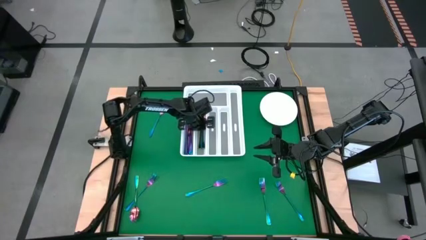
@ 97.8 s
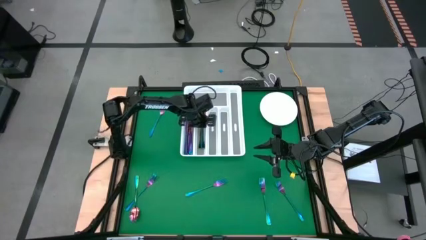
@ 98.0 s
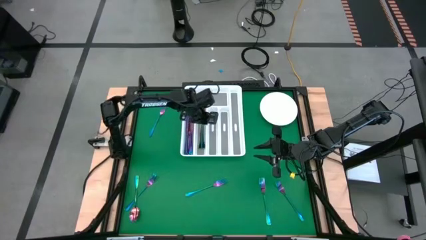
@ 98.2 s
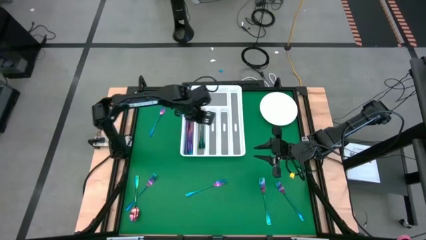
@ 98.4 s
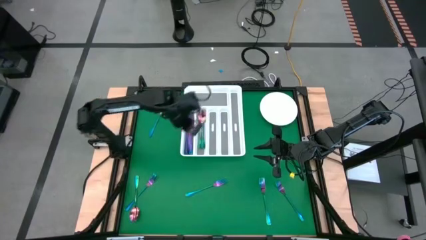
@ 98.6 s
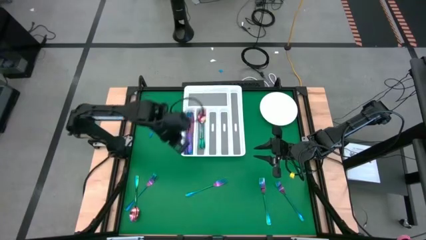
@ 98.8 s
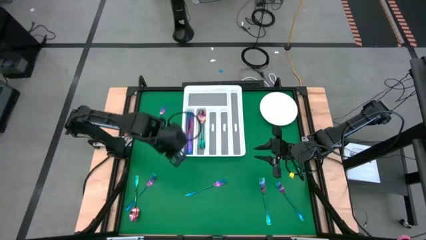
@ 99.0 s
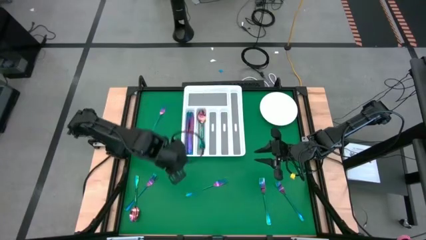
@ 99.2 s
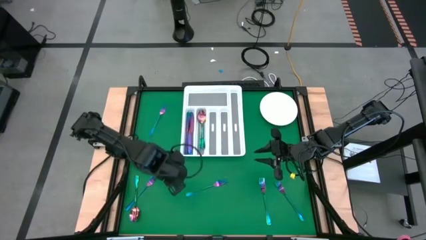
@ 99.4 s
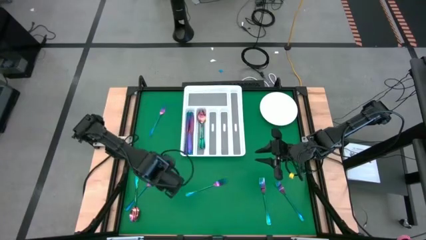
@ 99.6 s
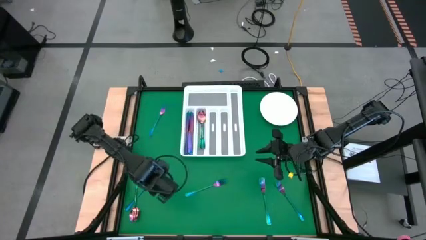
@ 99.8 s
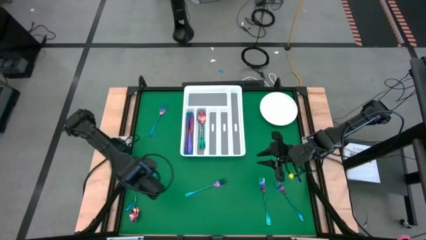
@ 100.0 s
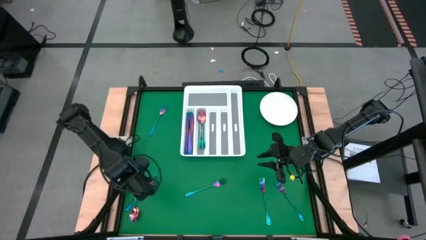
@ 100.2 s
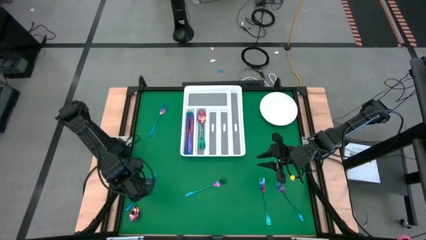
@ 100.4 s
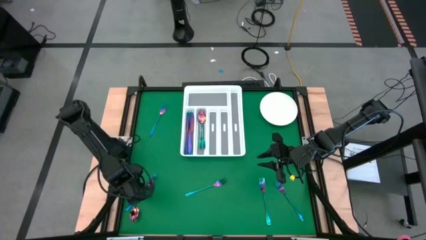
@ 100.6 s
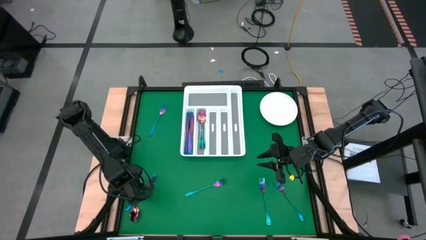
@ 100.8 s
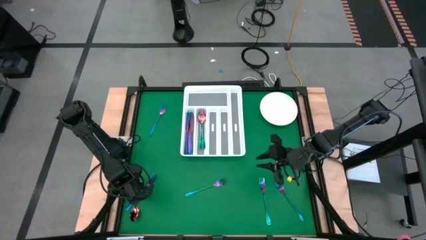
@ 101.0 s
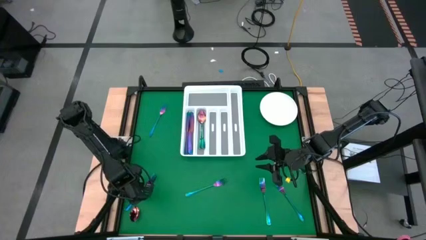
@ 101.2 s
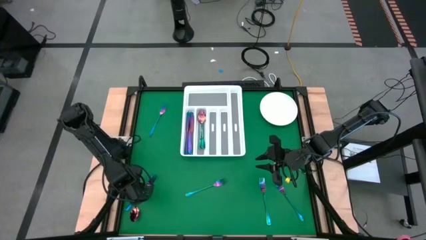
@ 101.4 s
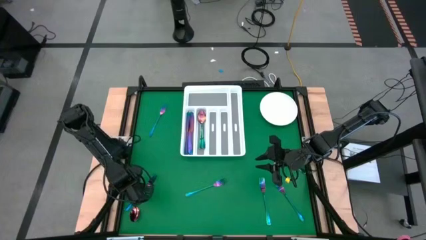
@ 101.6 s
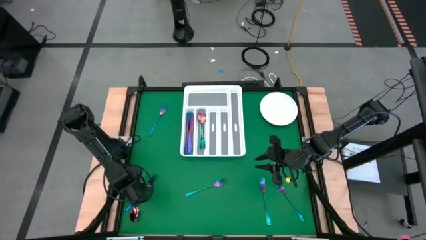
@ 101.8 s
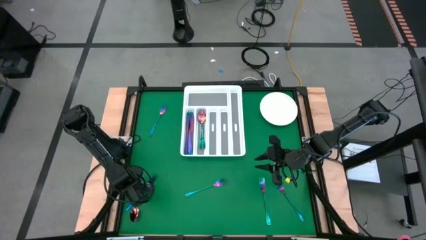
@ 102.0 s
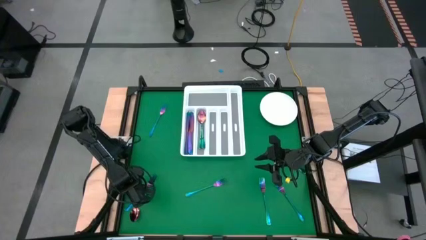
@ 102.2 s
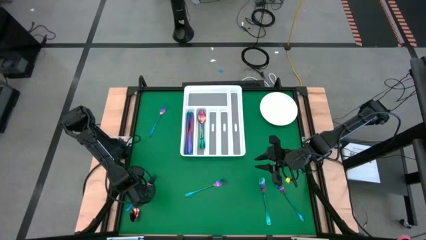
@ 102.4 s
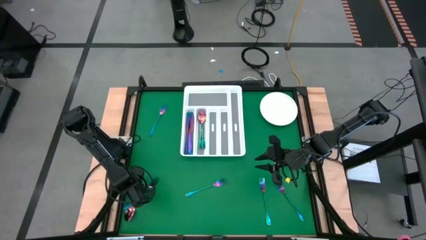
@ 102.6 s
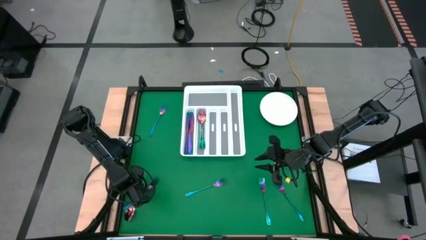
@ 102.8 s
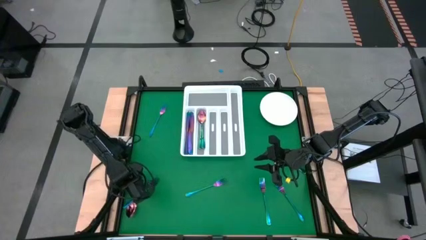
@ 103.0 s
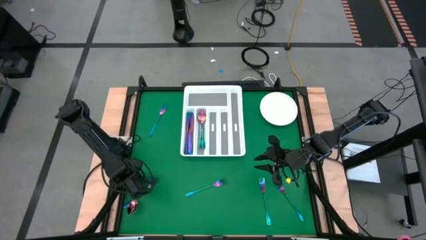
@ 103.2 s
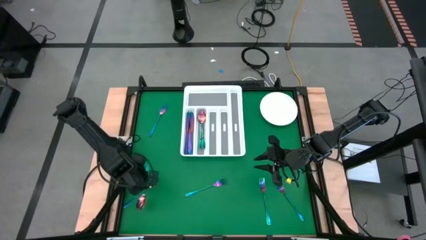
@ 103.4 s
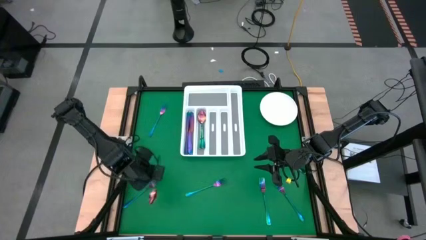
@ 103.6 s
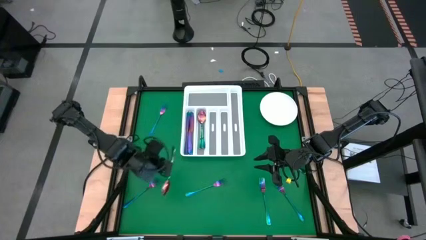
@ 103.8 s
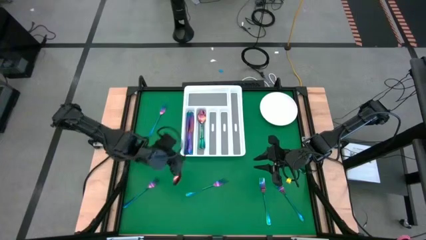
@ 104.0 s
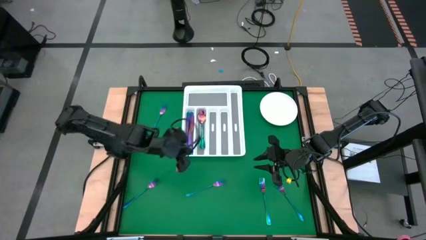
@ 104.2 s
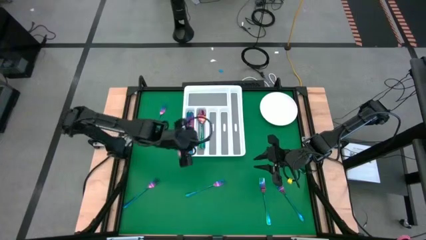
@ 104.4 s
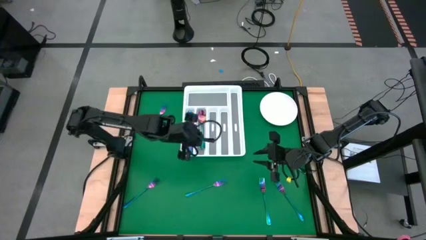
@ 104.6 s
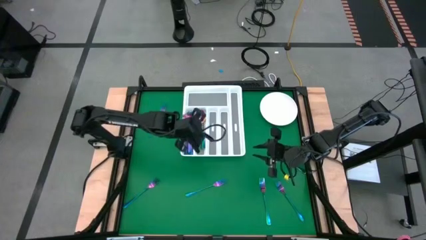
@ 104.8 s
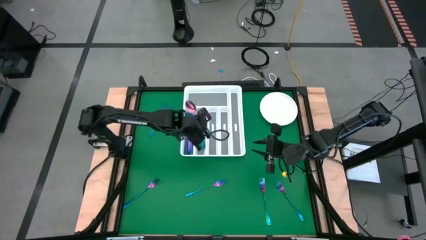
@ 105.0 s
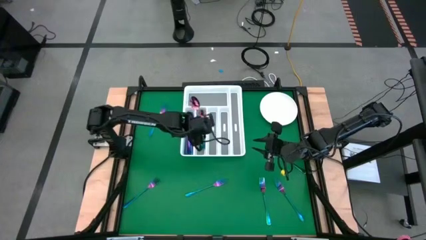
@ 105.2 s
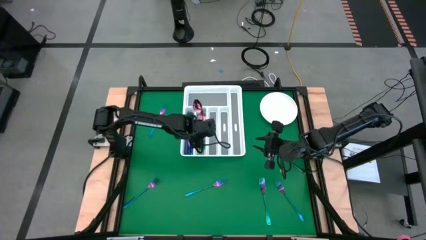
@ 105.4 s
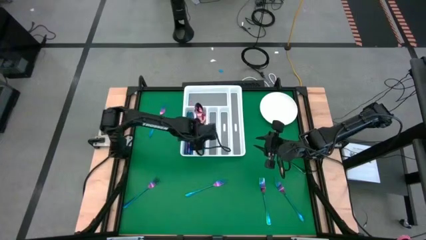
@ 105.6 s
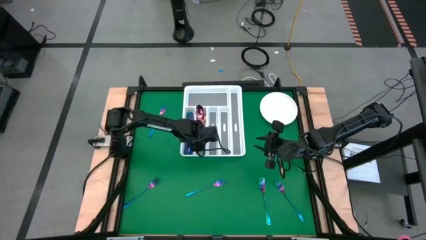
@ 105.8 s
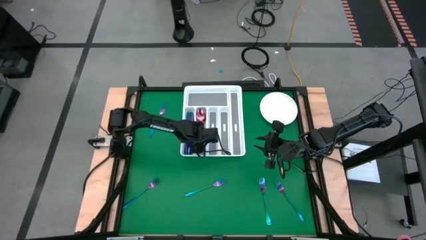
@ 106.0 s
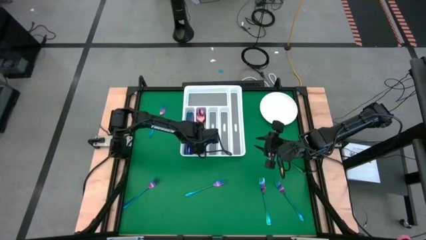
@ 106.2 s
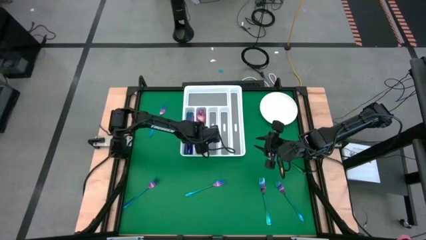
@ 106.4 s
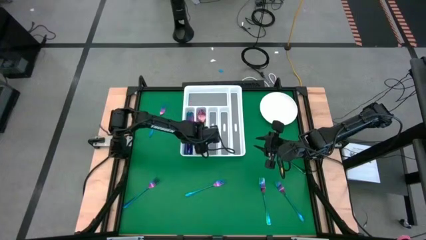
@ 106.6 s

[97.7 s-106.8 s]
Task: Sort silverware
Put the blue spoon into the silverware tray

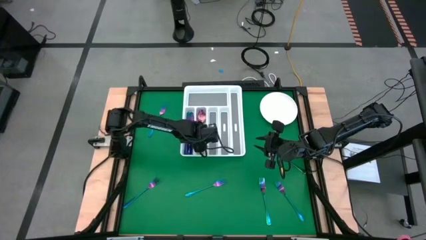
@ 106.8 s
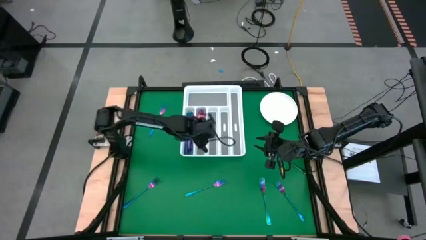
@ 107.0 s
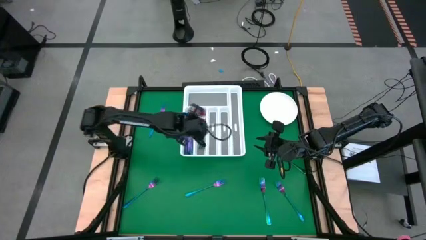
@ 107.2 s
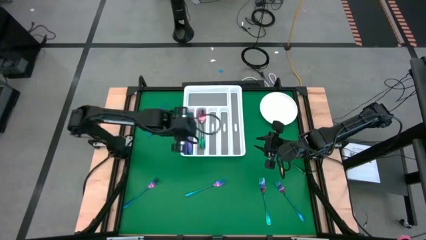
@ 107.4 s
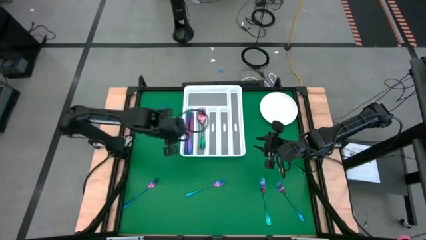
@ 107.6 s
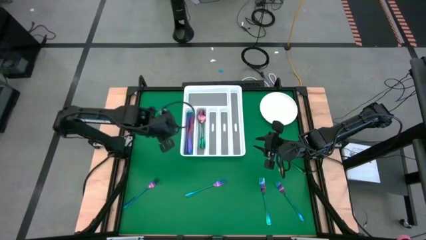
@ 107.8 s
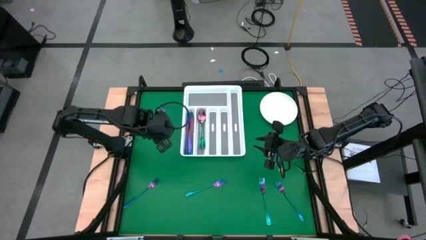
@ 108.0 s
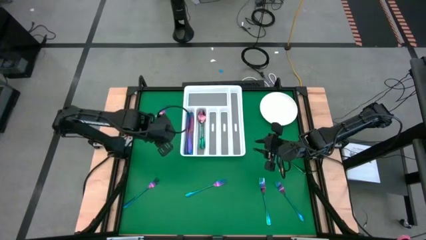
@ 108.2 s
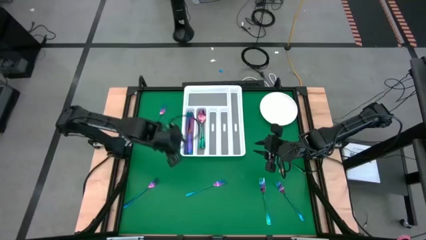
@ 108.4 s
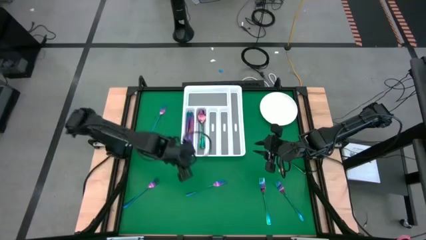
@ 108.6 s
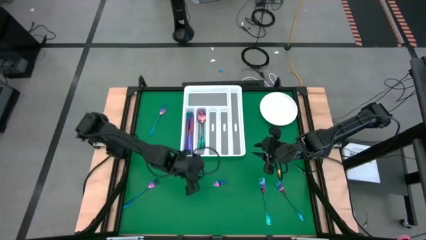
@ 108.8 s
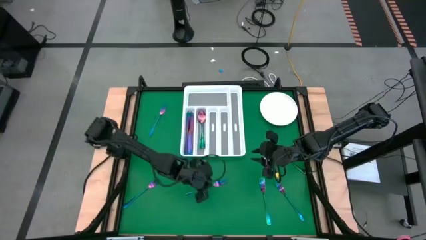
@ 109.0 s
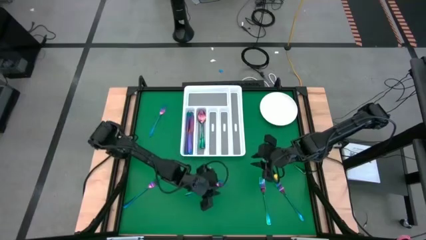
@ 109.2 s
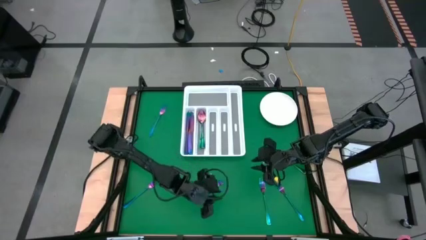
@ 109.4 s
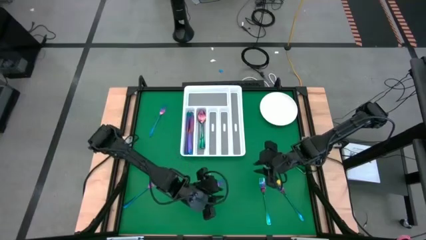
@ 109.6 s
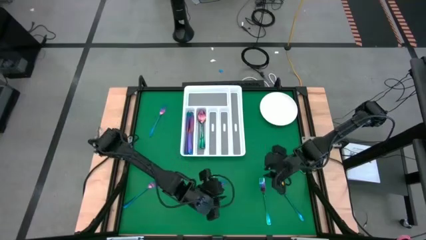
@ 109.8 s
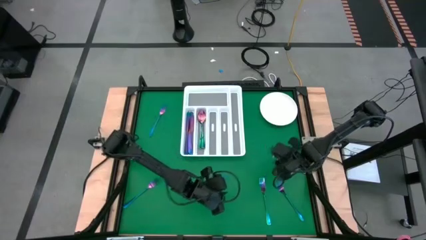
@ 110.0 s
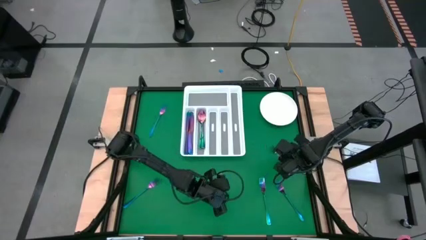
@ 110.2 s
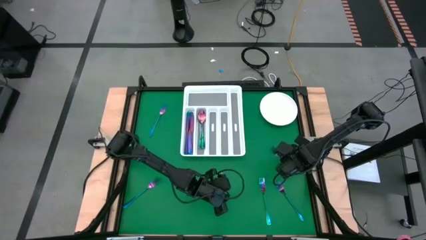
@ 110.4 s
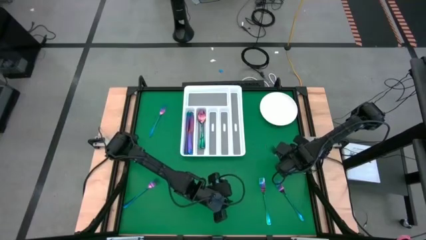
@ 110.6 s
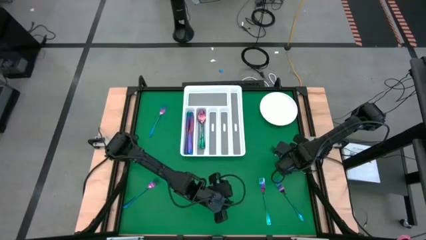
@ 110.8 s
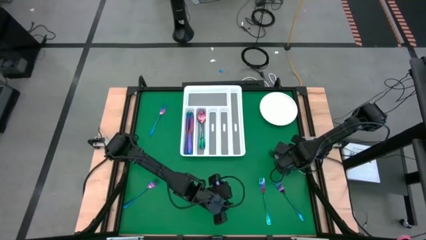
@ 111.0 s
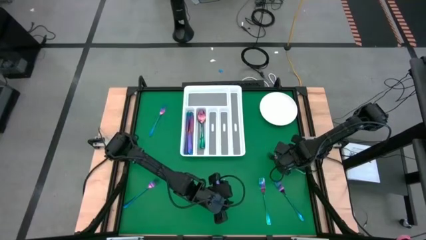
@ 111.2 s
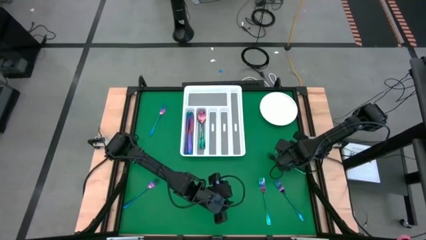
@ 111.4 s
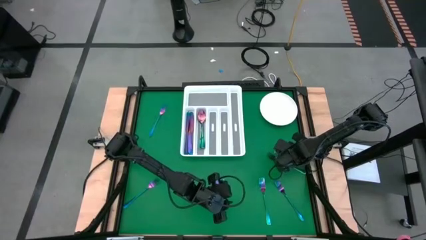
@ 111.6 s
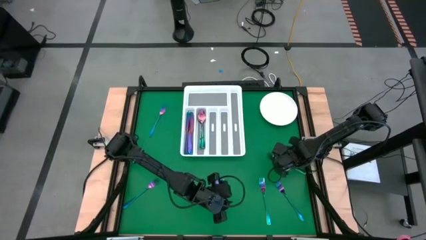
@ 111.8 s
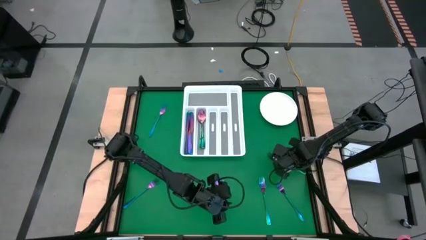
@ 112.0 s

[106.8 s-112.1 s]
Put the blue fork into the silverware tray
